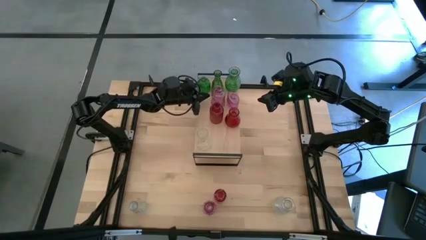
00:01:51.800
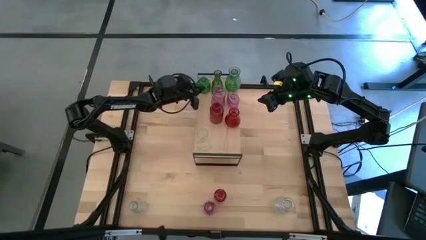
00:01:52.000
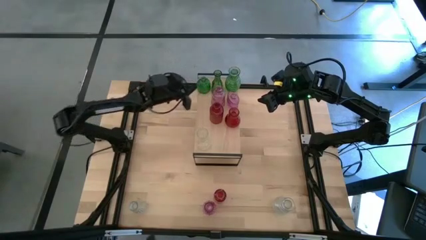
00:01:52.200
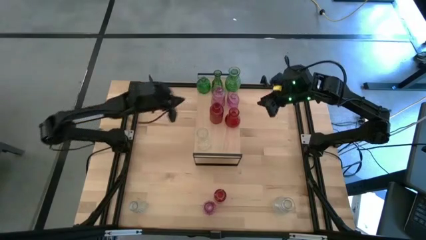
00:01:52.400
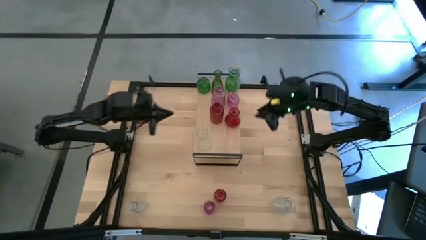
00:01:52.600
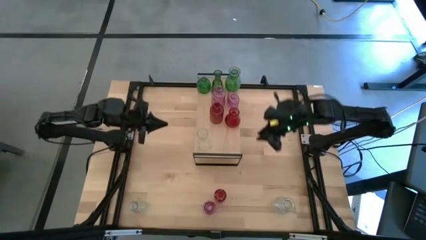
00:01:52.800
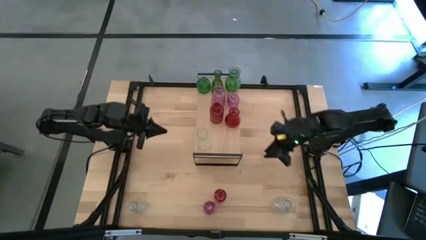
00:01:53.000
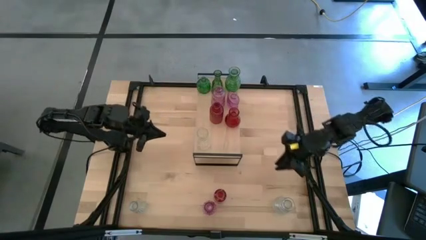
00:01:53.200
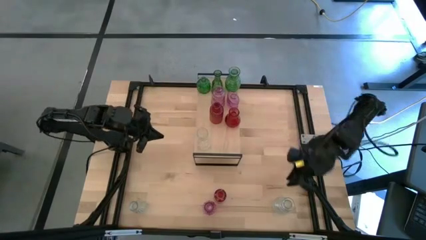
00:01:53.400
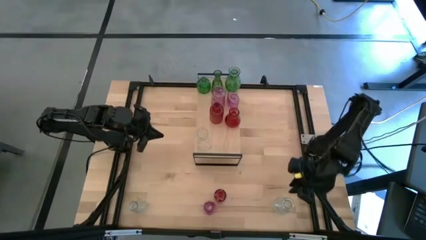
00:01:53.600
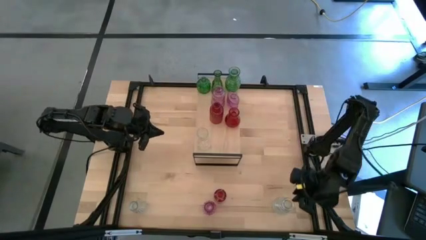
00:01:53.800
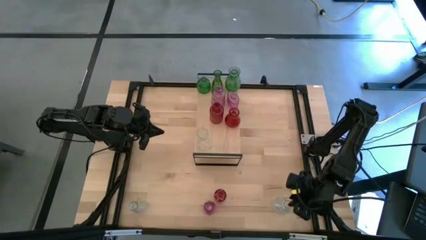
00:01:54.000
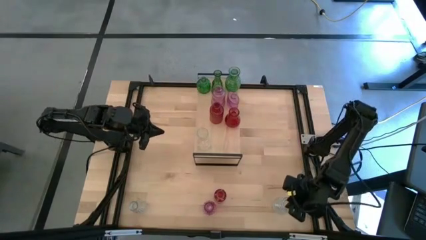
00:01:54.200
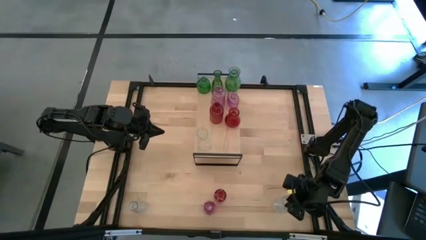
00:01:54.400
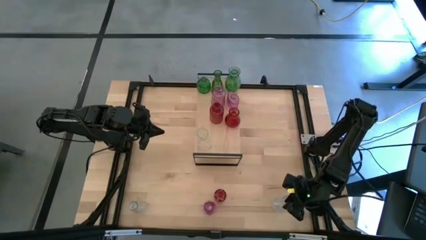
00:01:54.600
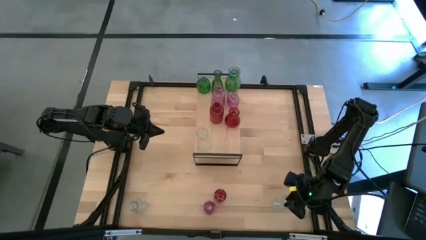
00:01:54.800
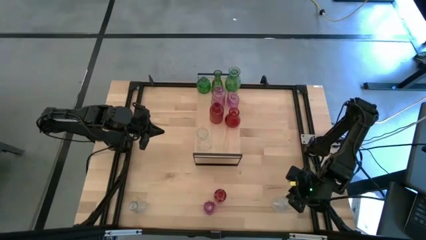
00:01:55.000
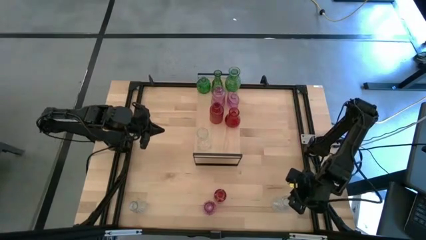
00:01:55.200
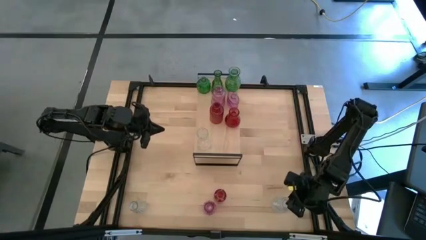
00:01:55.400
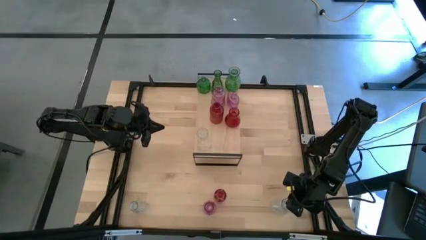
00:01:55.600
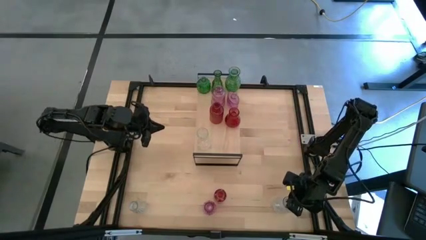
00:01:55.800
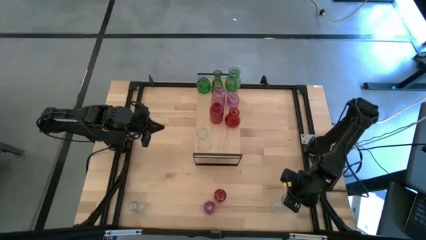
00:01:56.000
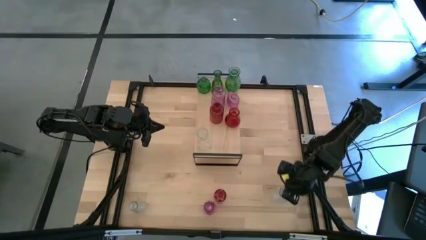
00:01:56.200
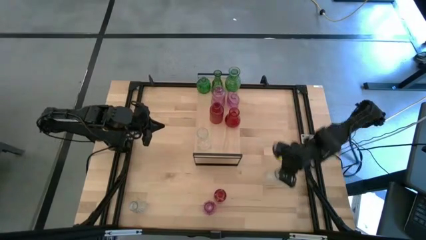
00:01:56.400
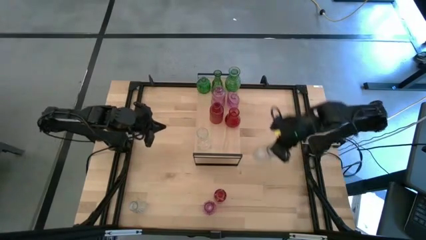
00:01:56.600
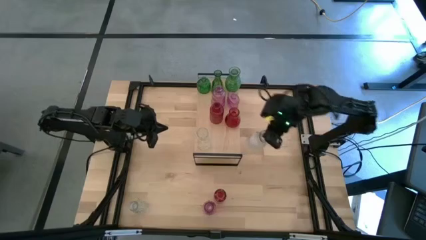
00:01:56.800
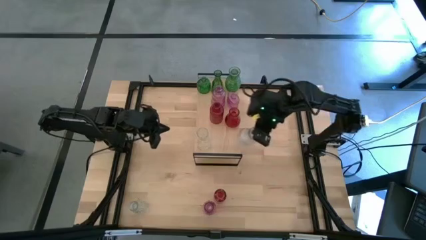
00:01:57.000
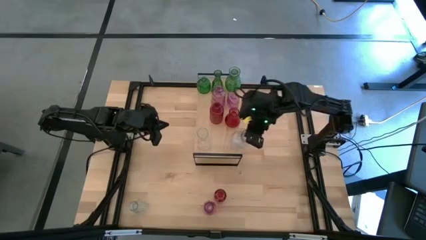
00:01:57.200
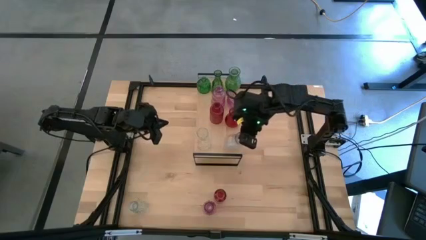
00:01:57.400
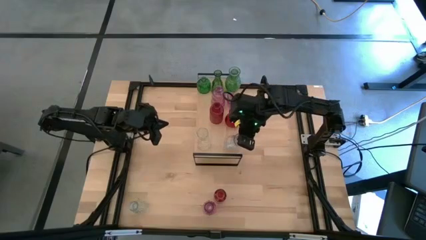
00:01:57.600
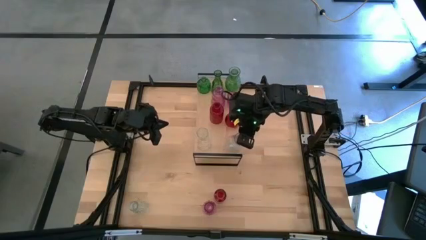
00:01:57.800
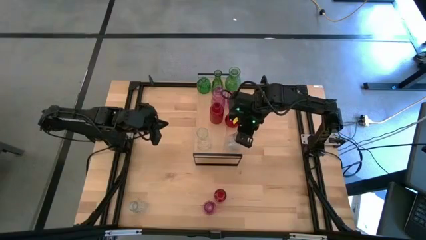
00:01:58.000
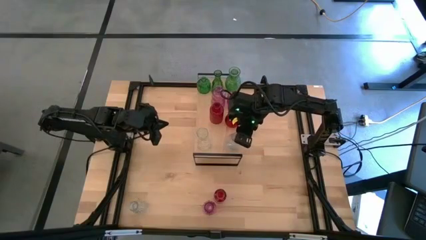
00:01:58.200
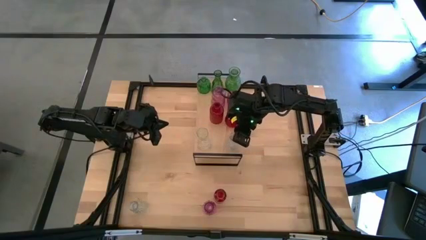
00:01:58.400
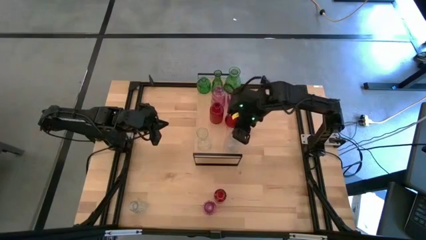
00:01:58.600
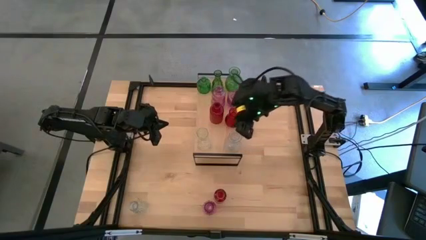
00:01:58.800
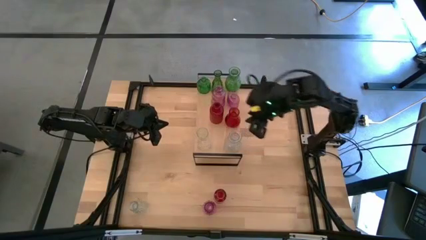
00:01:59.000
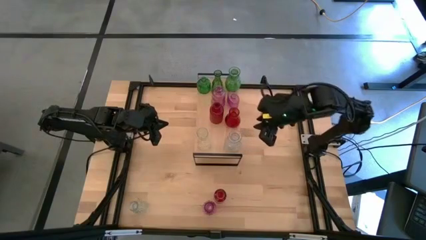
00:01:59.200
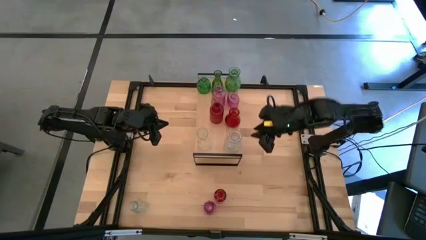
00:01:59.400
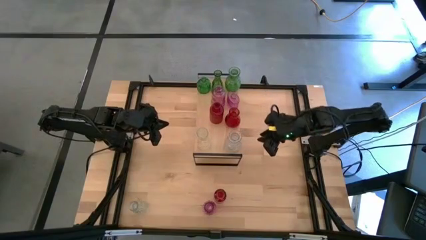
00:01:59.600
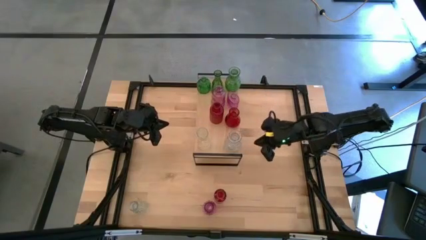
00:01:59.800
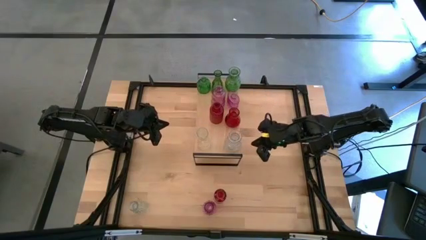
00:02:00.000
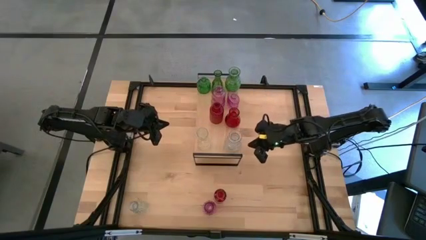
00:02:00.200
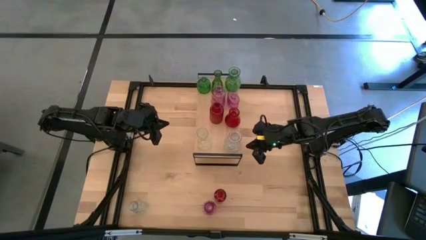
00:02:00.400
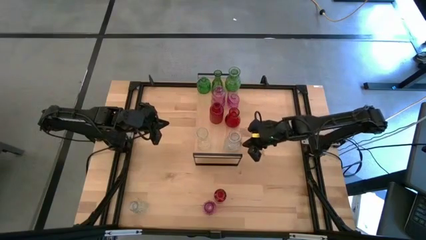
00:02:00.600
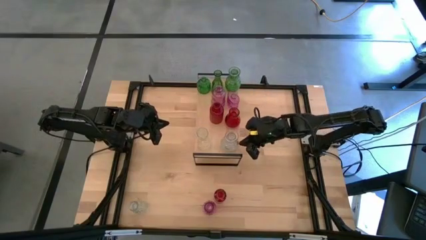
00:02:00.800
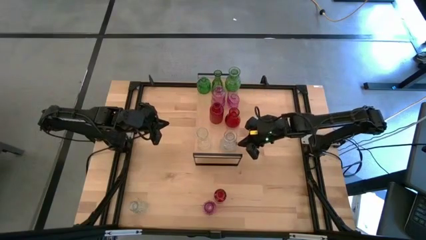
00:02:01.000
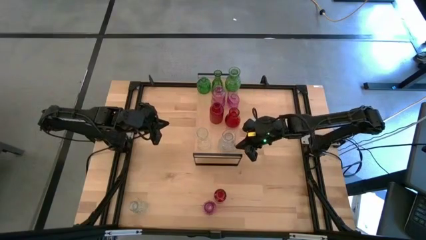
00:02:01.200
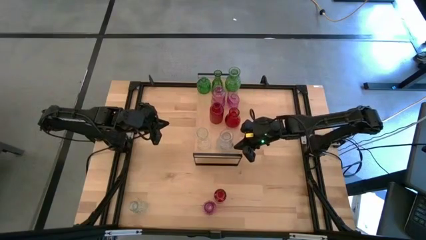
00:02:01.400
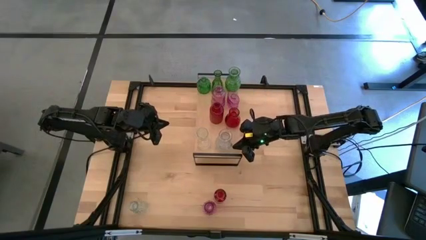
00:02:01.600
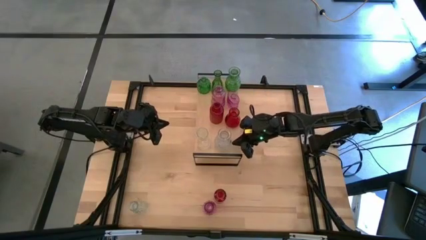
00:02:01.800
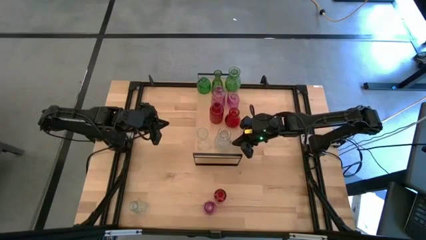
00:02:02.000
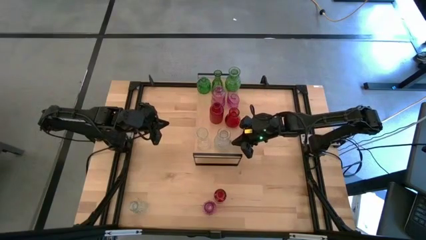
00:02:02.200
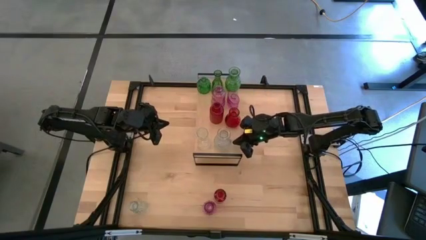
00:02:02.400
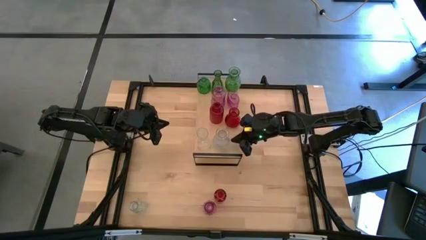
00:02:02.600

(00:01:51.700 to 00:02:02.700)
Task: sort vases onto shelf
Put the right transparent vase on the shelf aligned with the other transparent vase

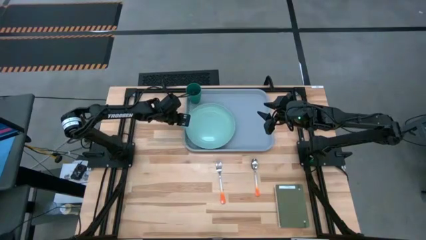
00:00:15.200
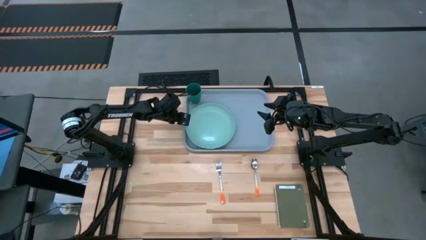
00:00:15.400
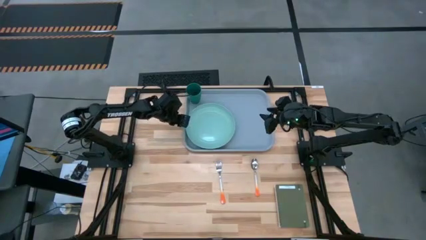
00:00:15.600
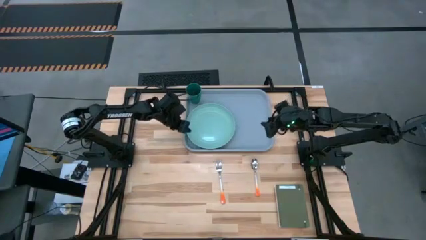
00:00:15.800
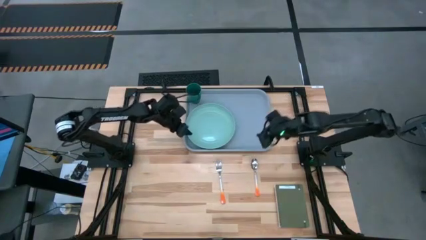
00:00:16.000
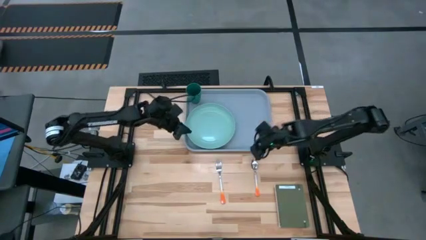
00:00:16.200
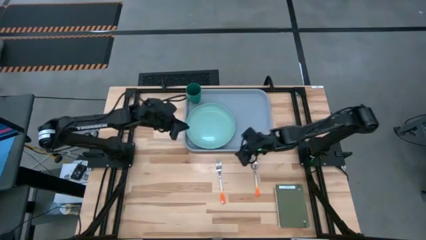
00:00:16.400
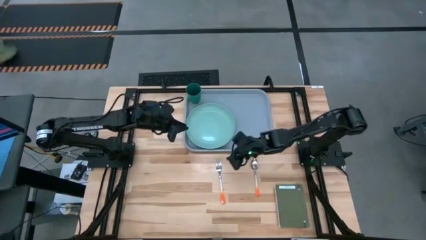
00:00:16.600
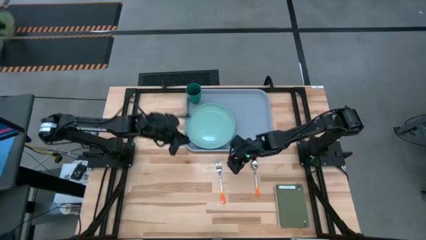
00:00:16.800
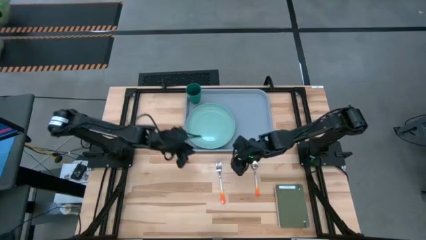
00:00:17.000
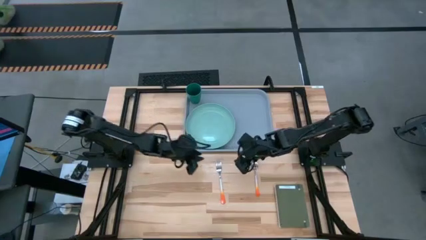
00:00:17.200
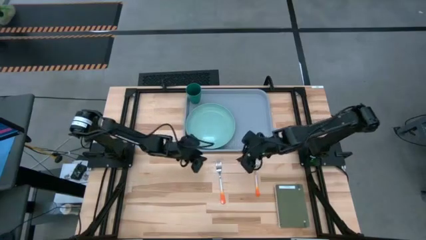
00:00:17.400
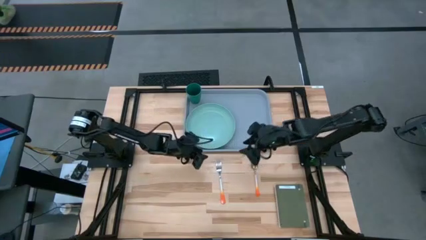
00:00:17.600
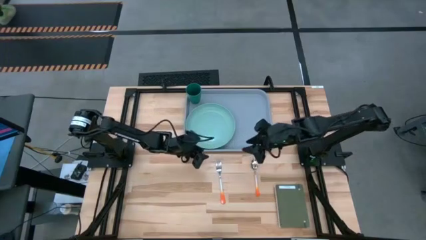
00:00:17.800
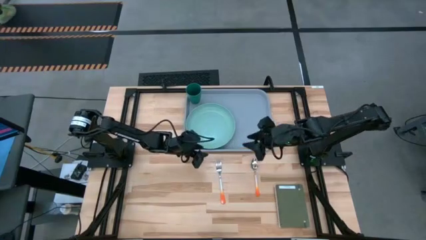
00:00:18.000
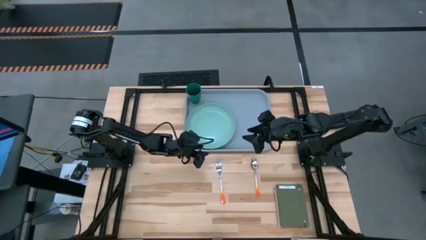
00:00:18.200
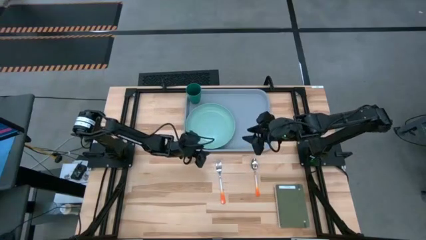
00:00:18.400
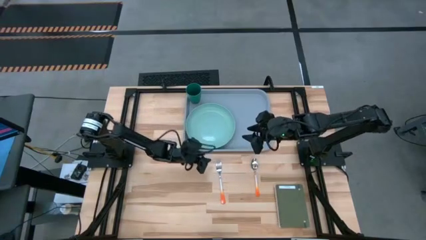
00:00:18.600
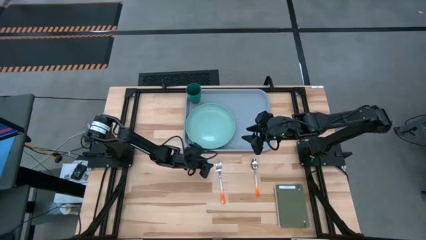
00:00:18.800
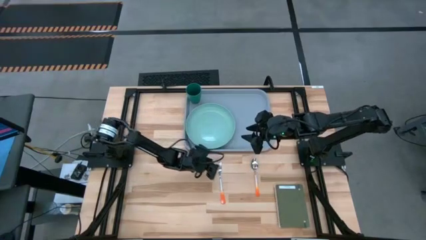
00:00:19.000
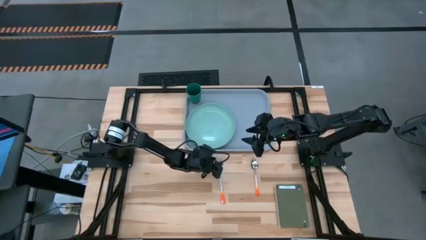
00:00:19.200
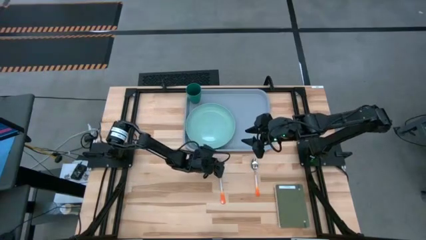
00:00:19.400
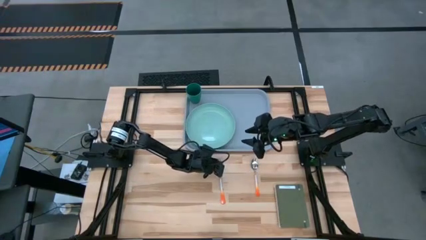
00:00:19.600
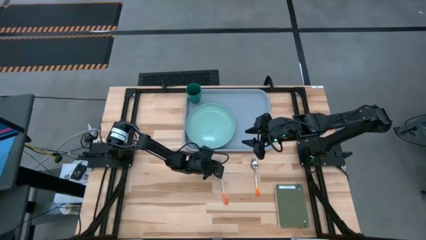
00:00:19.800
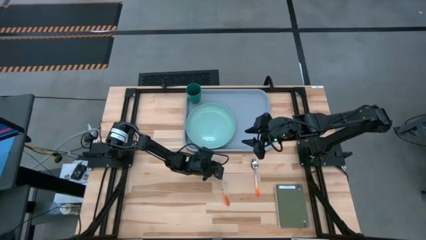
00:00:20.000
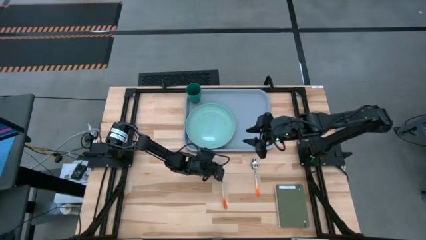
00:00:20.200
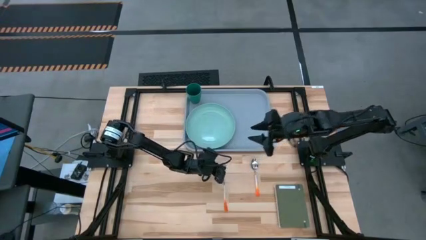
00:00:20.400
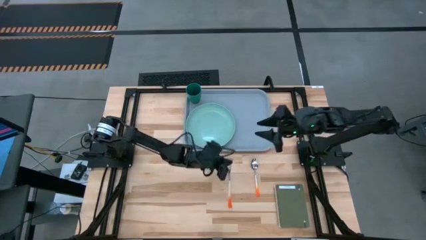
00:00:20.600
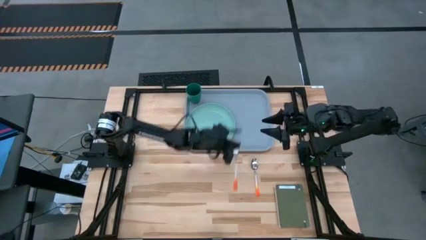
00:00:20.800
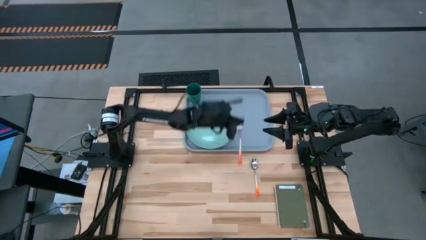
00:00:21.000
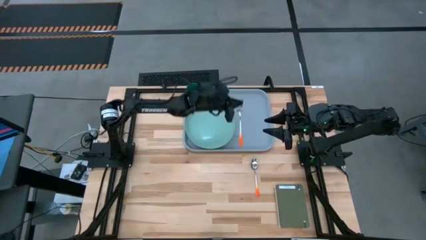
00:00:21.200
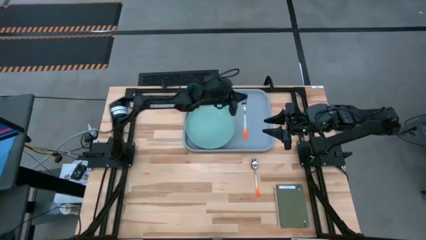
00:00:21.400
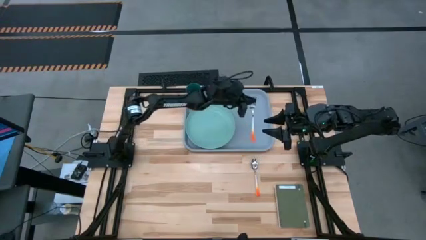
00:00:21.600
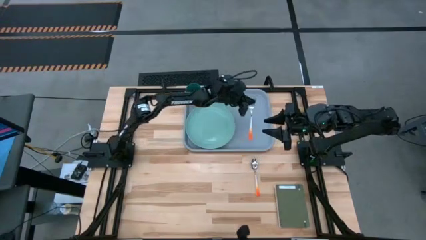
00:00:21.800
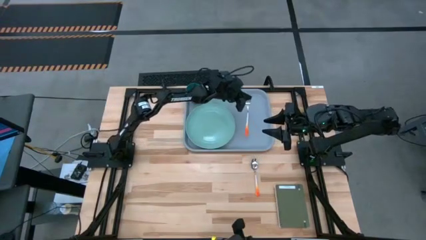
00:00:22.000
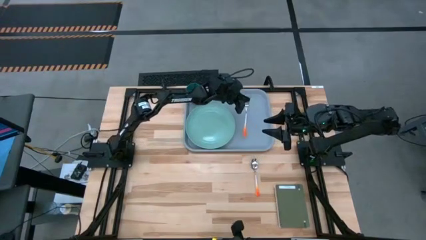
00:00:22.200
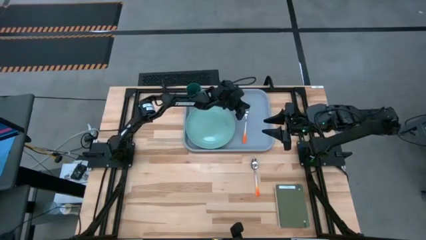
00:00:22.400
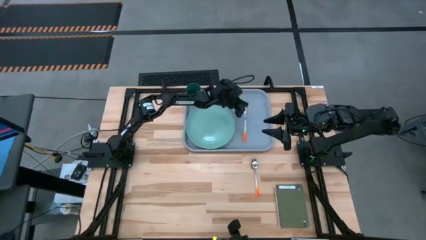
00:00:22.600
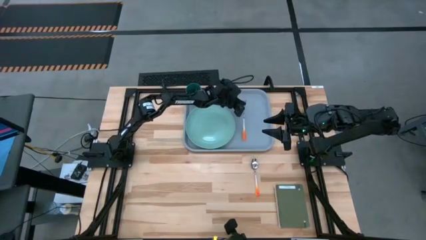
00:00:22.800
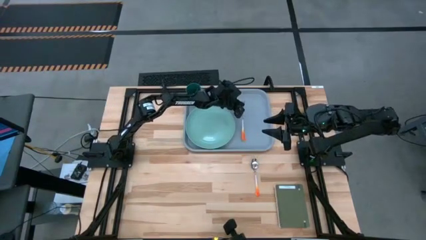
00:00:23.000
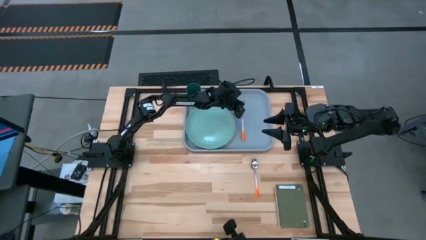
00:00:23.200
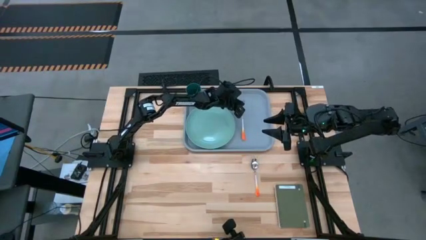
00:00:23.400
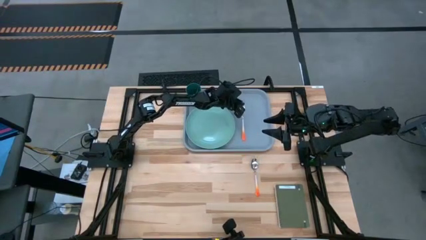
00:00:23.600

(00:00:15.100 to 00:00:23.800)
Task: Pick and place plate/cup/fork/spoon on tray
Put the orange fork on the gray tray to the right of the light green plate
